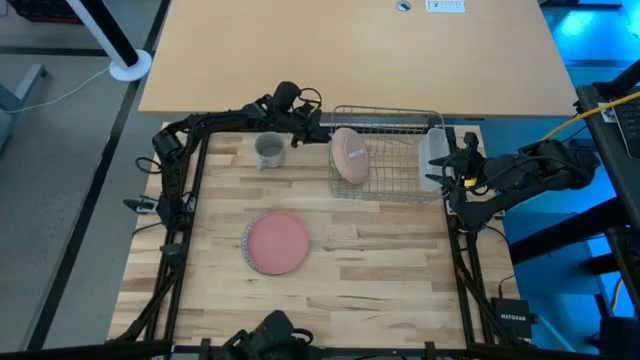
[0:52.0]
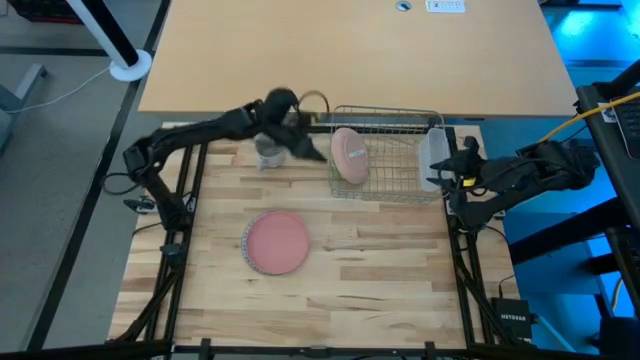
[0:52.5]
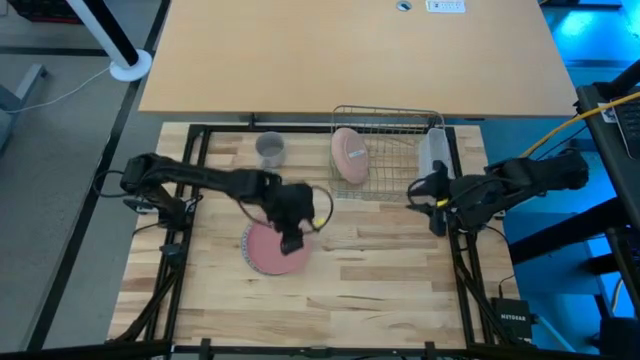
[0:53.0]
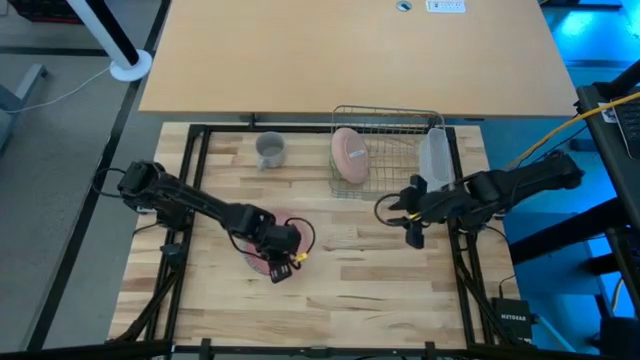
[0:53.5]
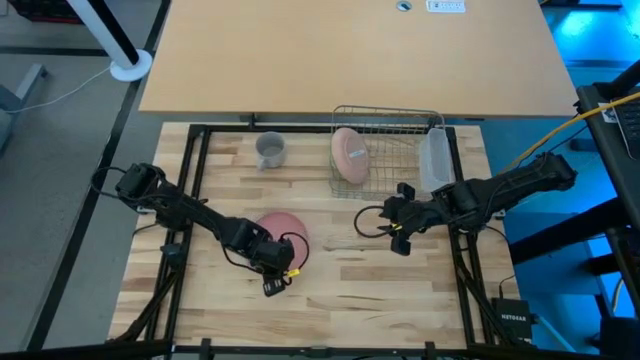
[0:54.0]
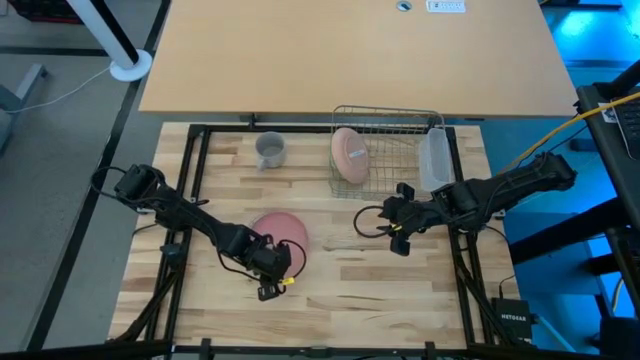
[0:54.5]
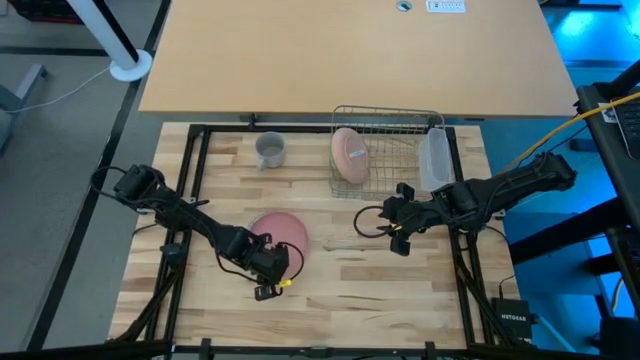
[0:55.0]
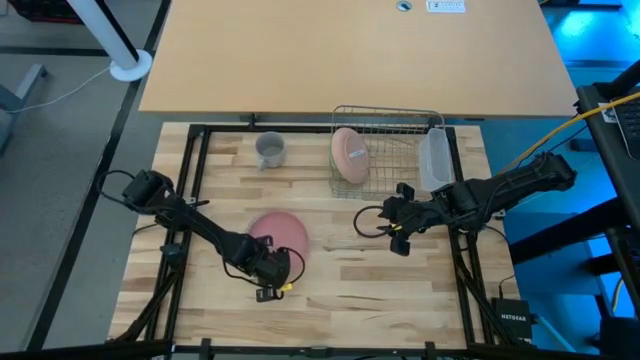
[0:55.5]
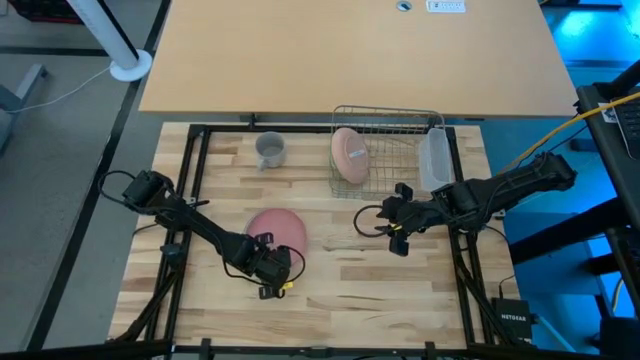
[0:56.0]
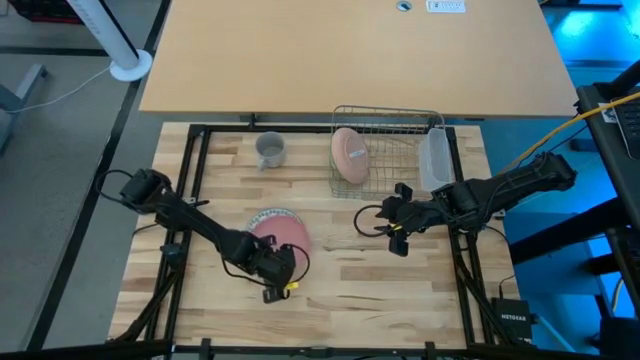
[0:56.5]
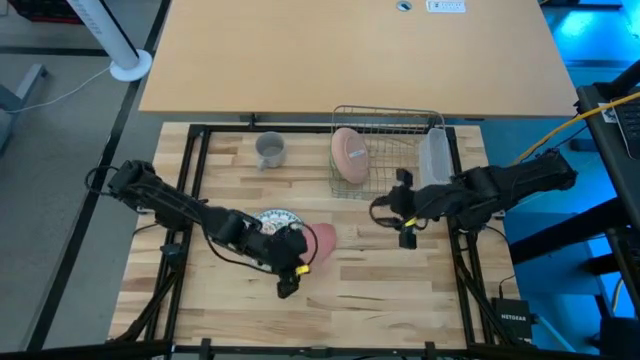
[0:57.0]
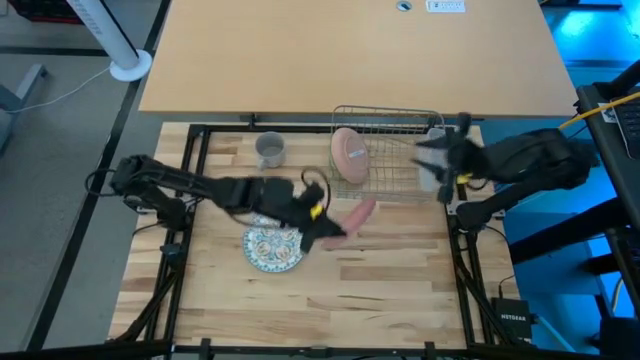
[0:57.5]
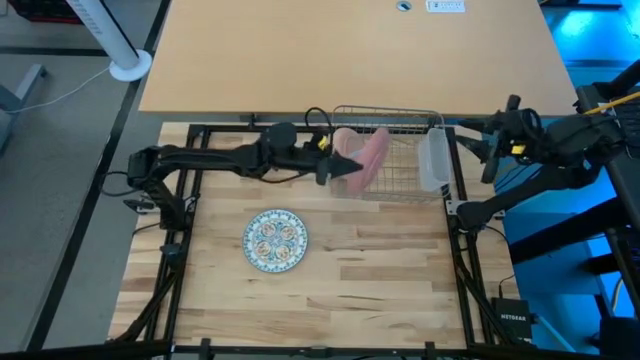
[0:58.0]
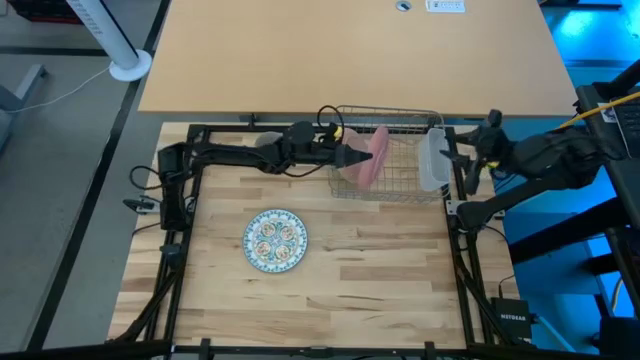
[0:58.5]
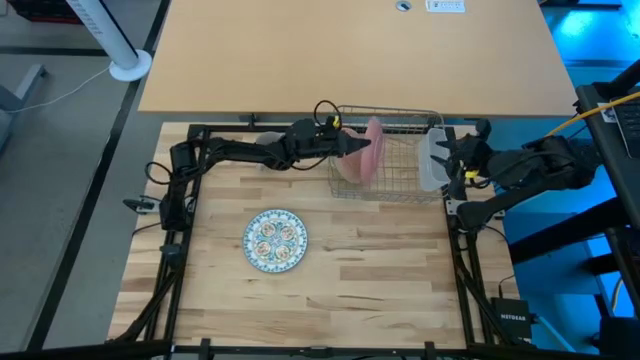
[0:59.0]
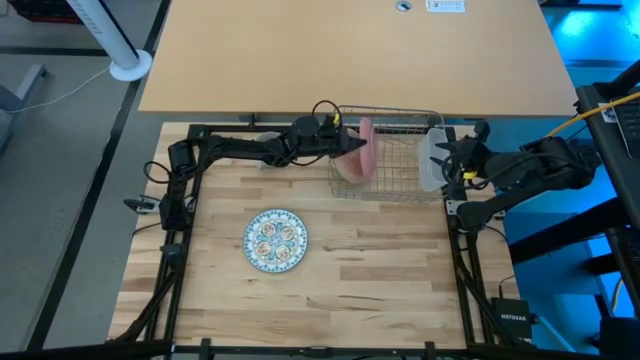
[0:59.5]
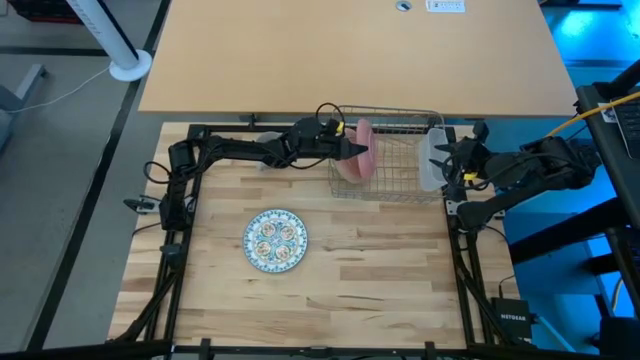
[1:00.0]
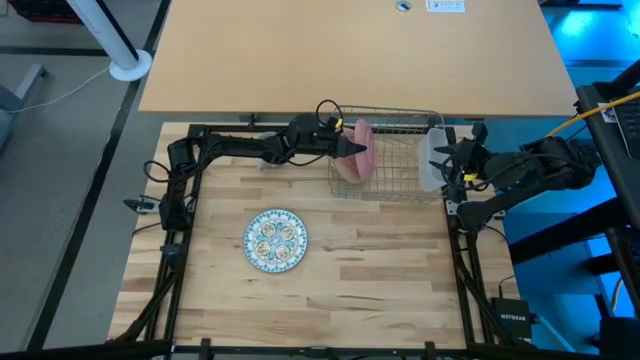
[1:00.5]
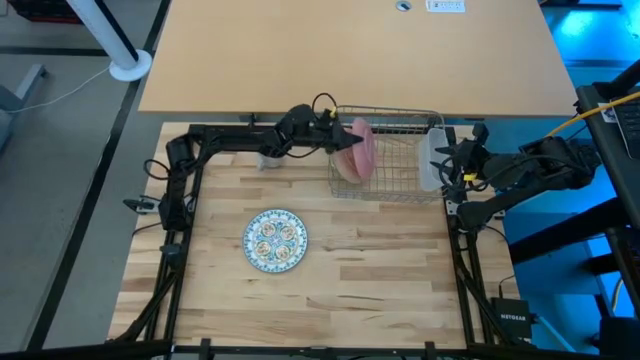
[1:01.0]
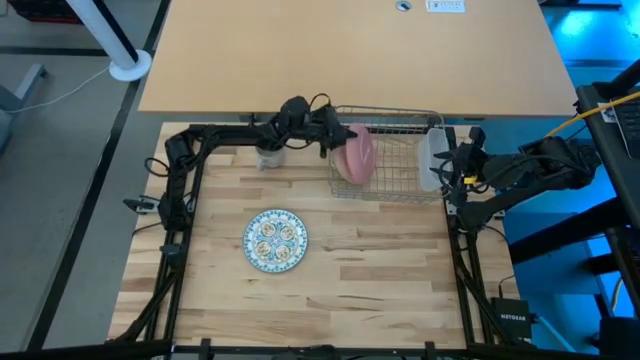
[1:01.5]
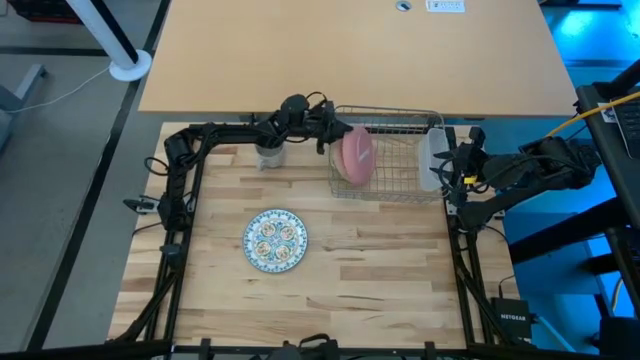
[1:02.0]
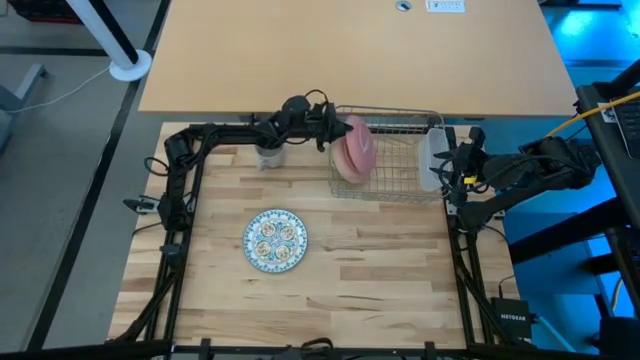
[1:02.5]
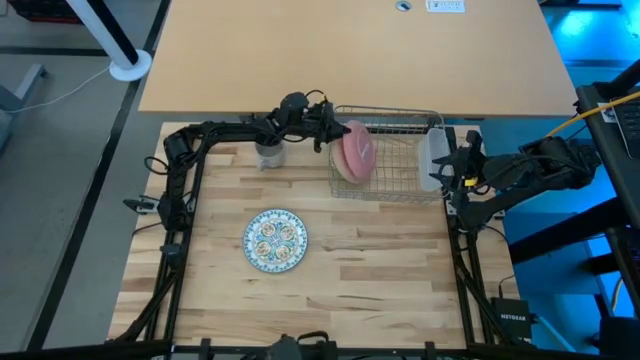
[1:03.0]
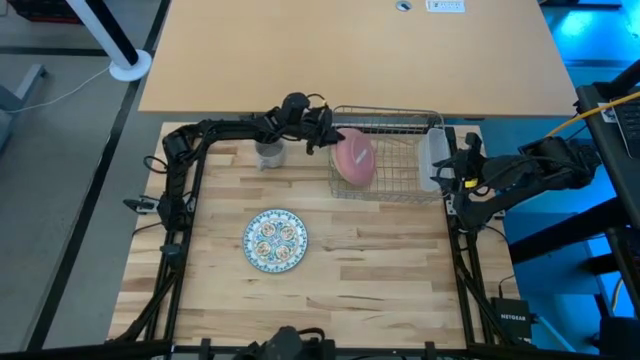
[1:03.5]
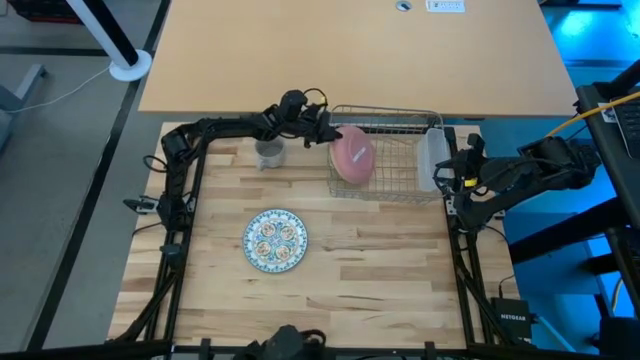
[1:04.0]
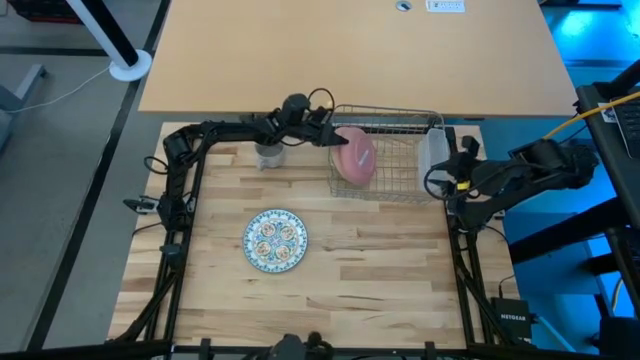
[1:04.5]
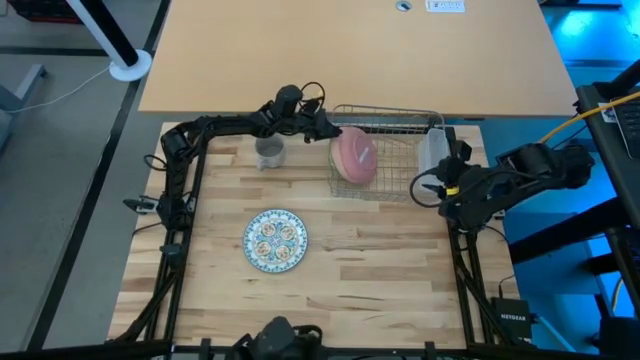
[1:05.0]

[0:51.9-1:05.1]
Task: Sort dishes
Put the pink plate into the dish rack

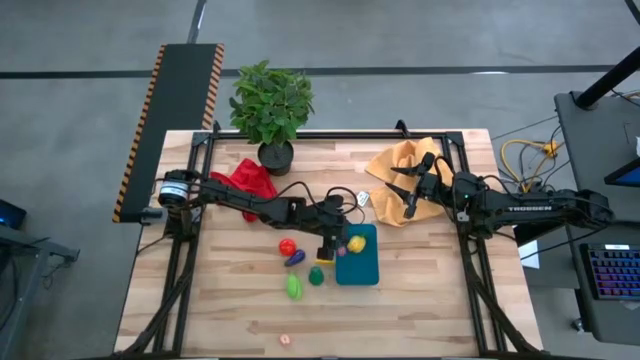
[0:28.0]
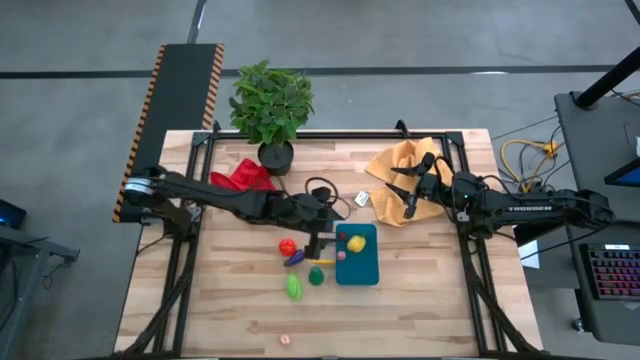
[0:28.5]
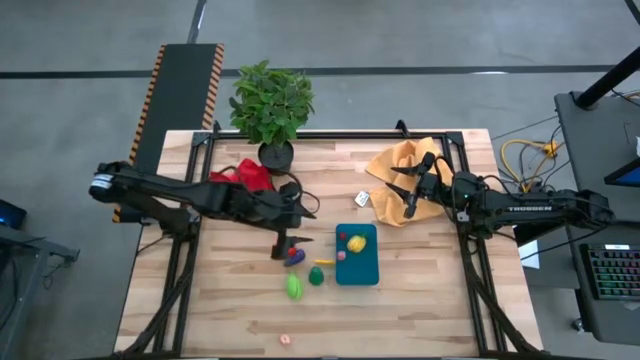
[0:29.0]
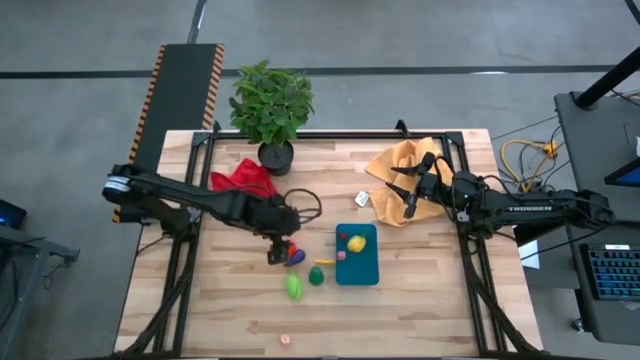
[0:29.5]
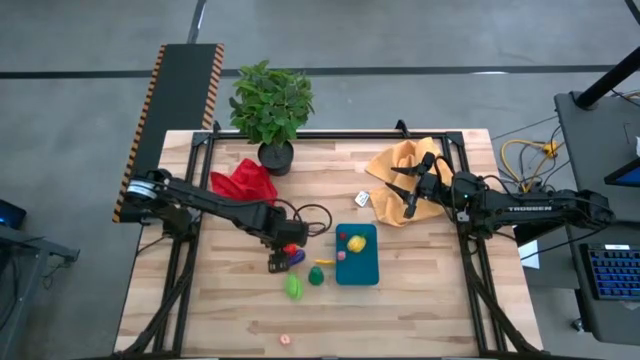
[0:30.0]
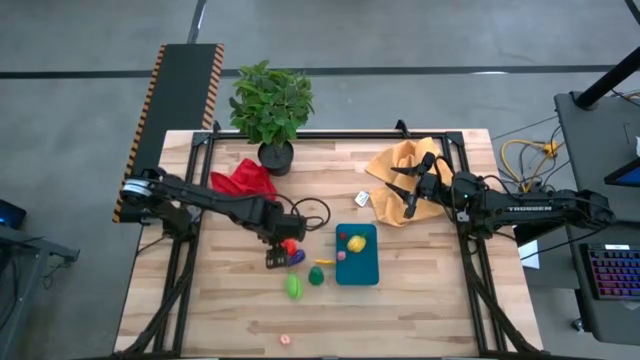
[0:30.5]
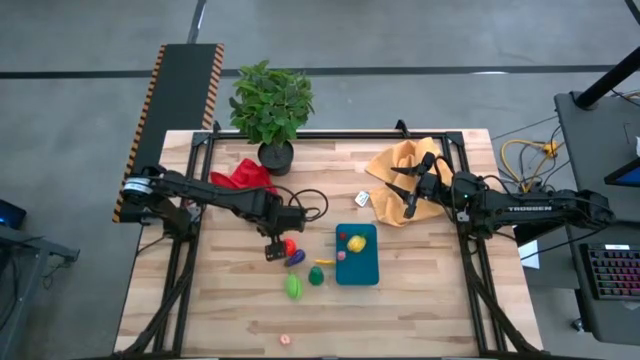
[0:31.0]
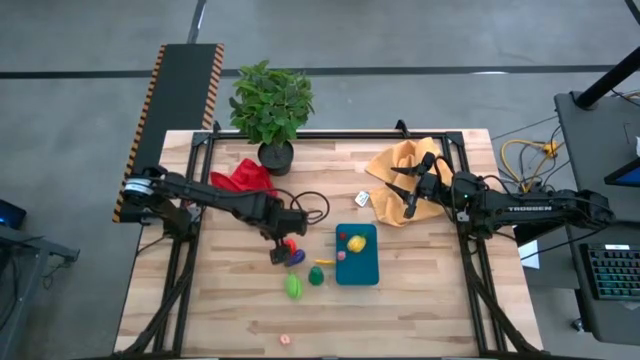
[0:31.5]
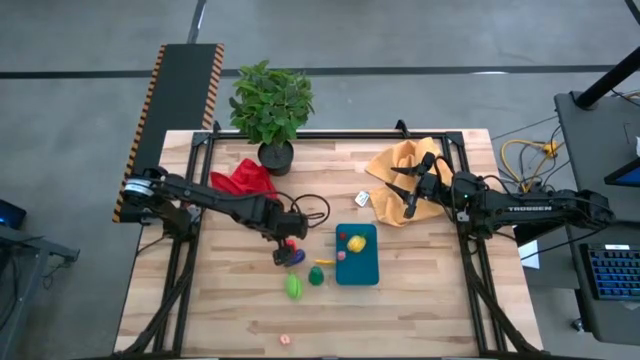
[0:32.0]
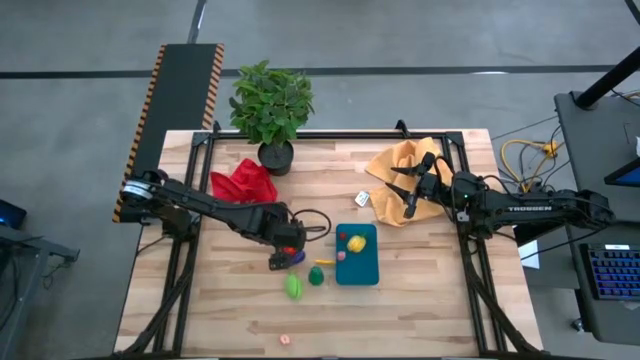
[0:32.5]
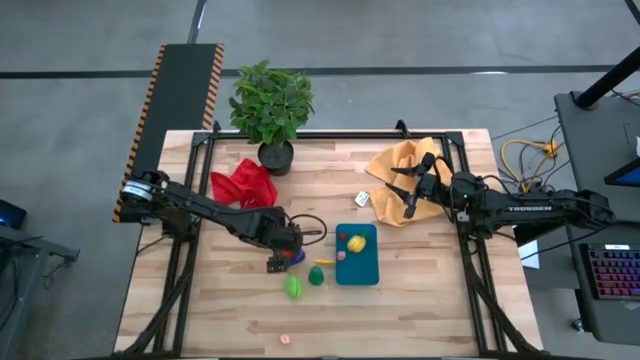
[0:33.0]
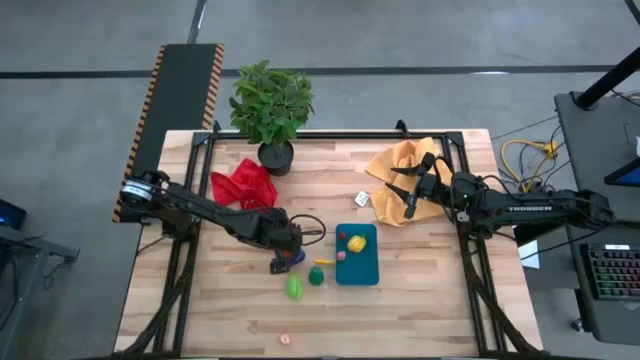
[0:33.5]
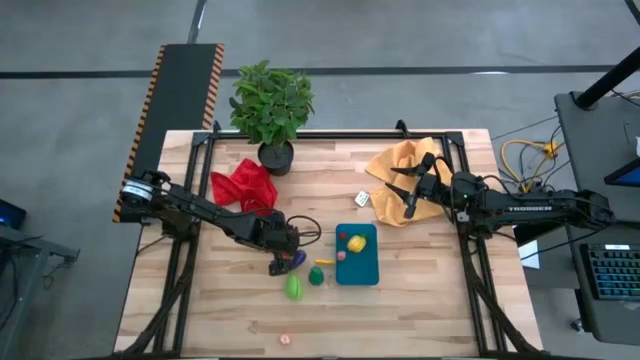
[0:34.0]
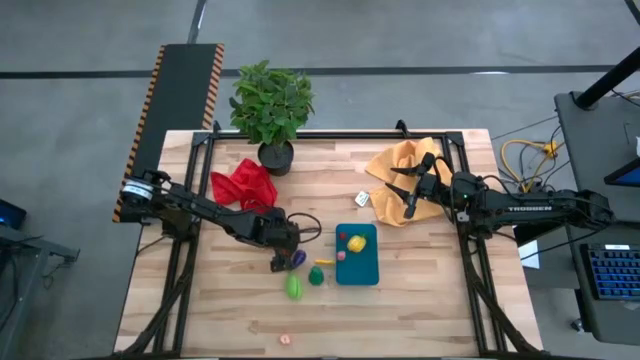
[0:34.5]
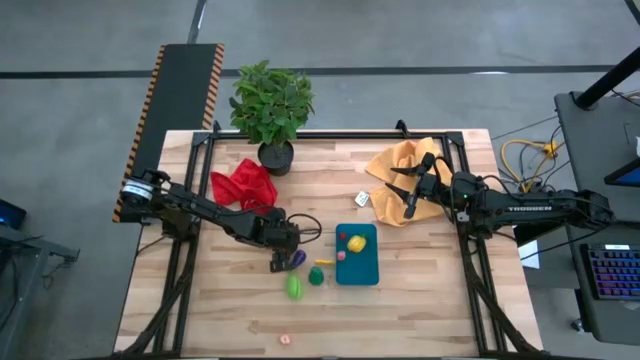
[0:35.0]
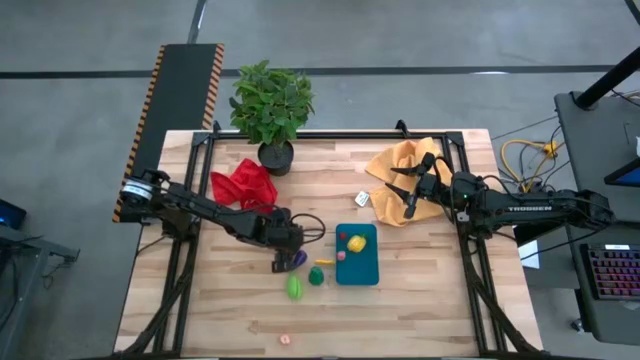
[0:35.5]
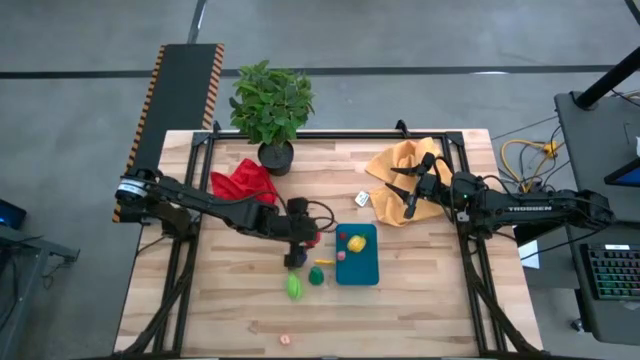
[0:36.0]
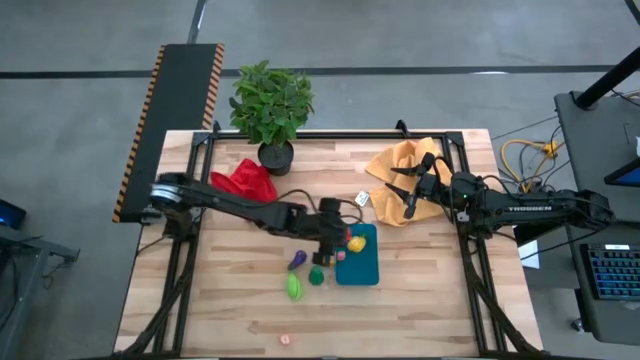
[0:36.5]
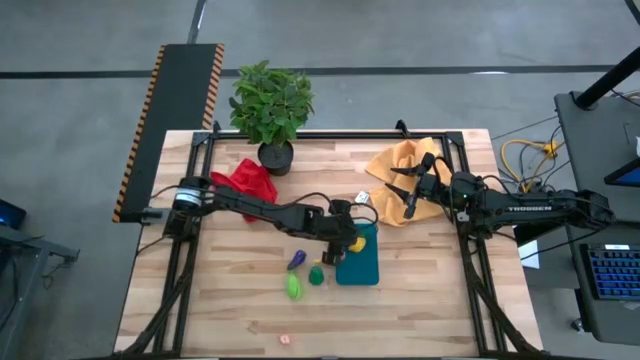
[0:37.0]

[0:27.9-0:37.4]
Task: Pick and placing Produce into tupperware
Put the red tomato into the blue bin
